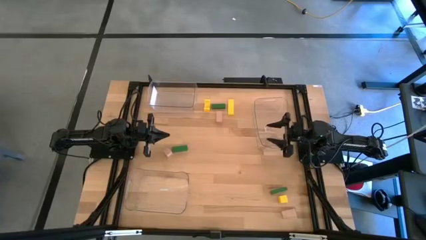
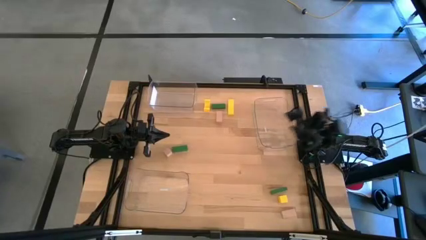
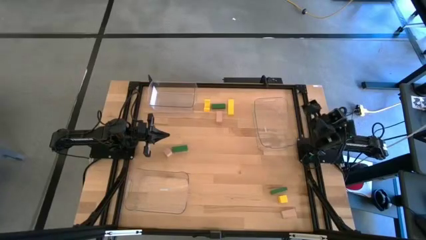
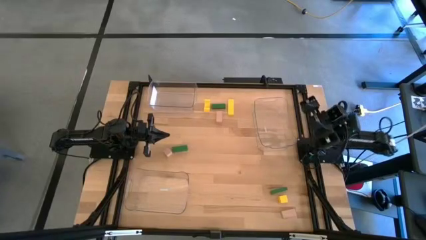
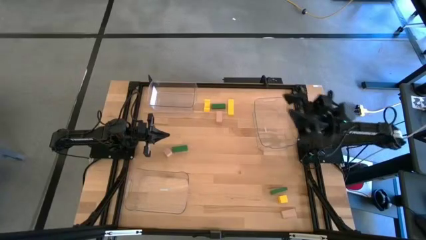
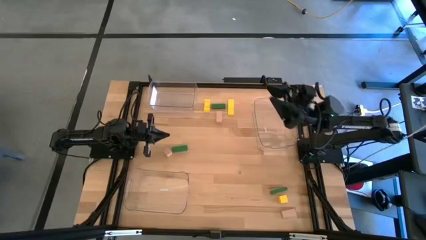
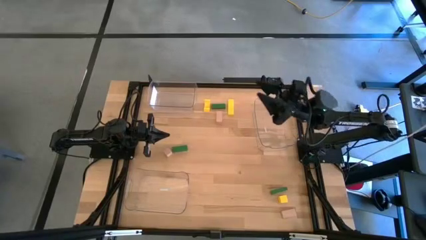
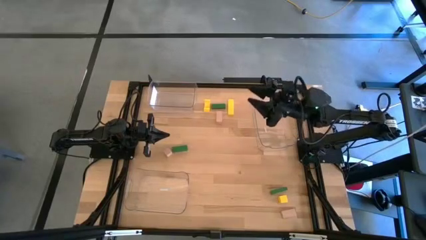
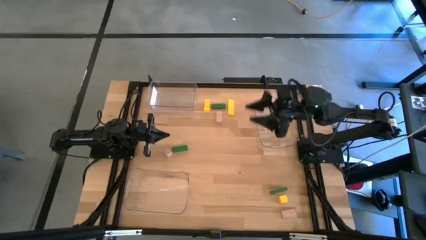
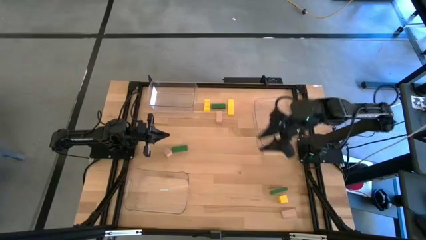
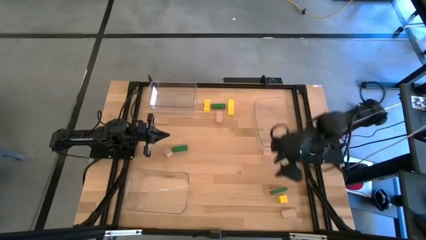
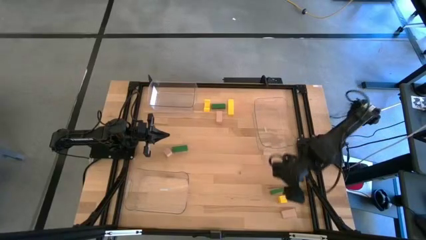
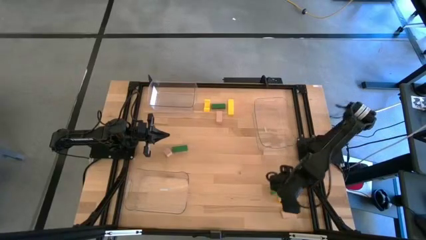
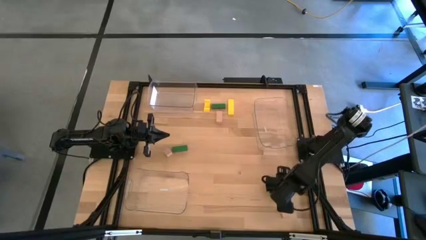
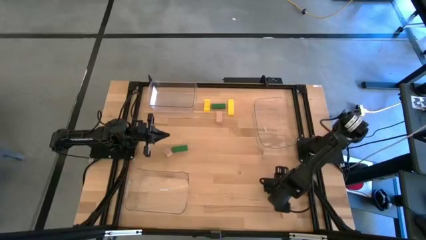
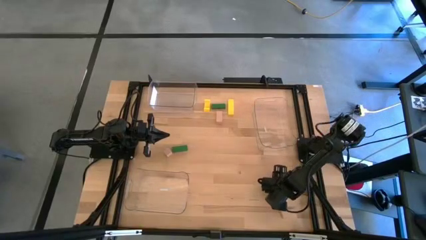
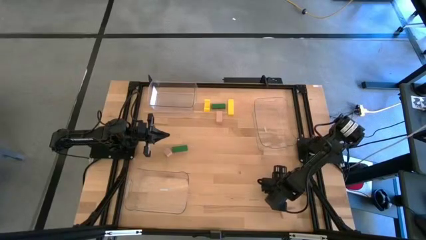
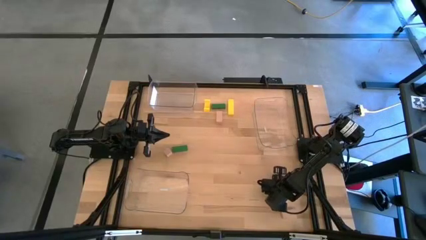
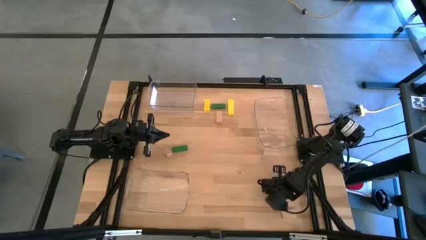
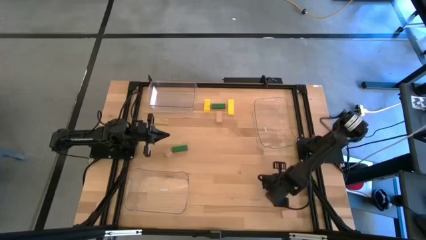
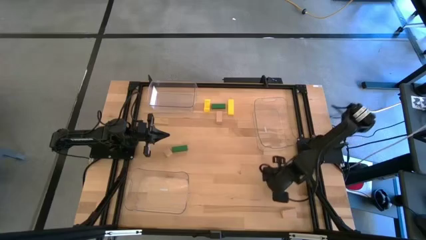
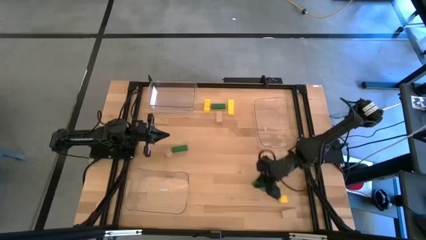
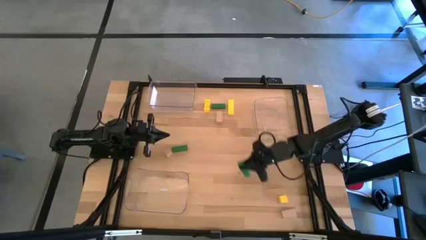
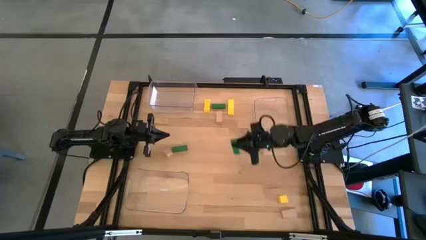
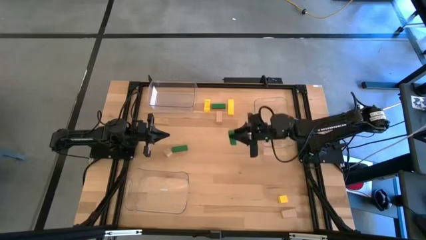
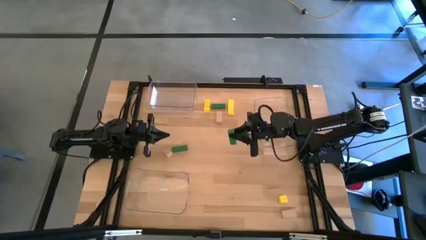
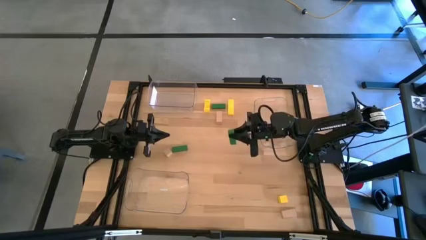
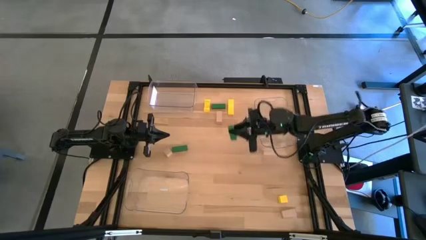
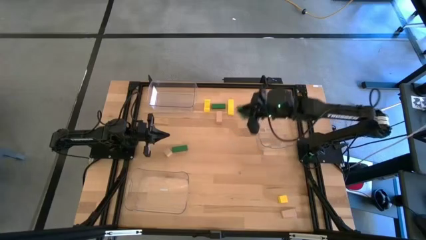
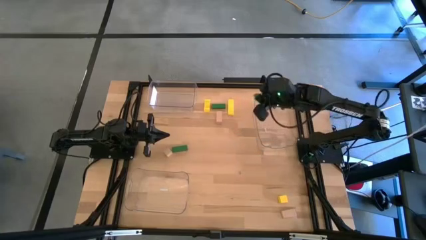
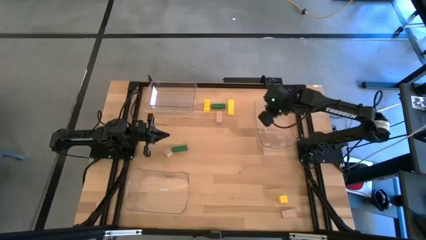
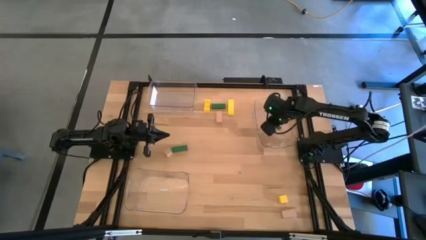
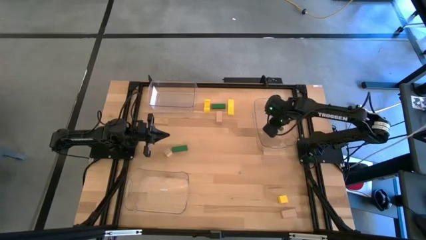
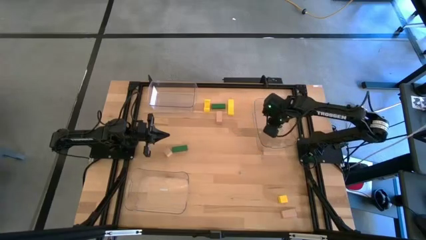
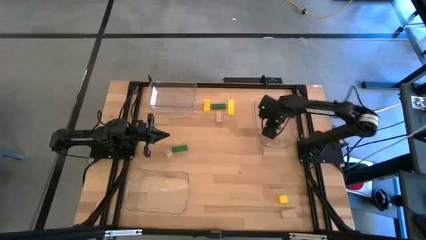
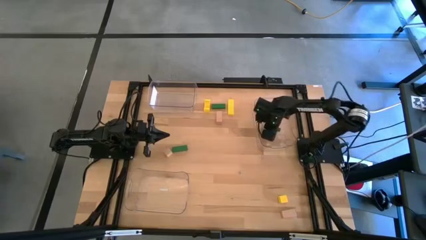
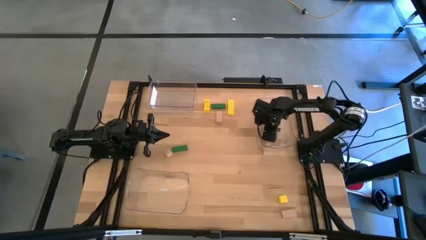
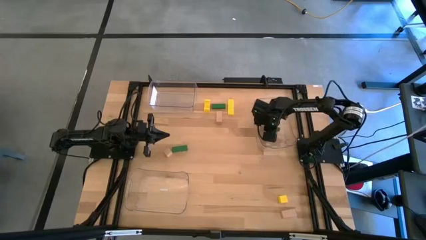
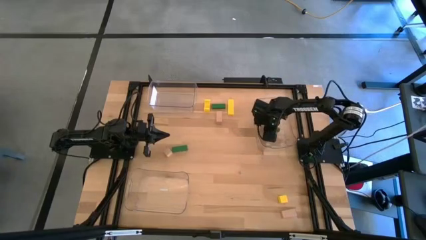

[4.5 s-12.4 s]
Task: Sort & place blocks by color
Put the bottom right green block into the top right transparent bin

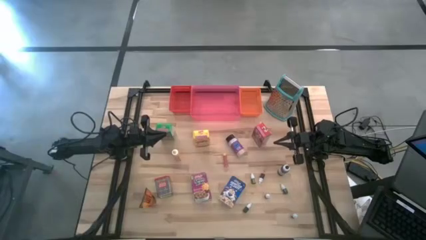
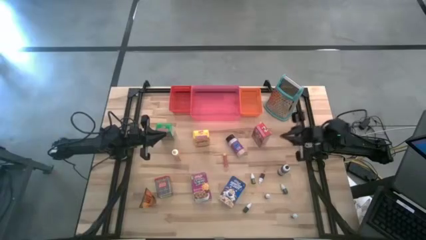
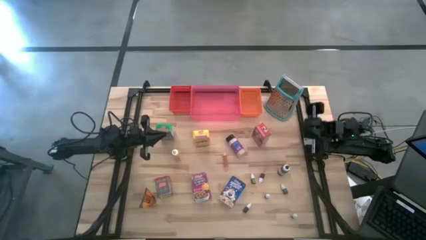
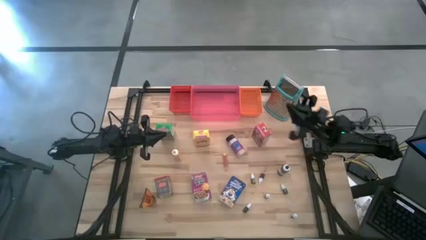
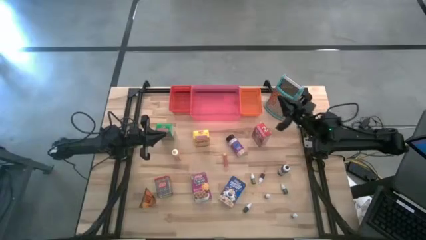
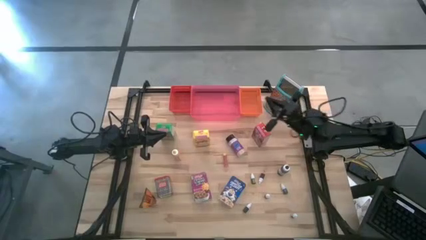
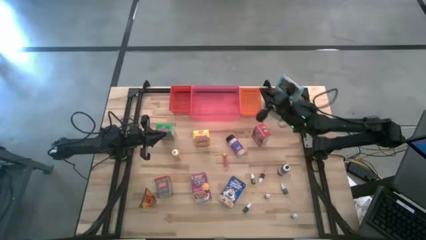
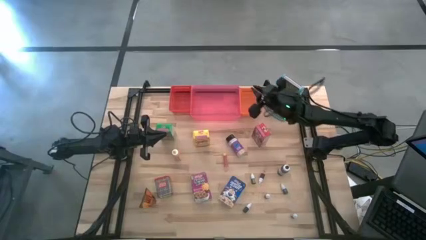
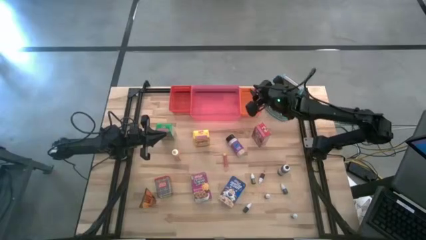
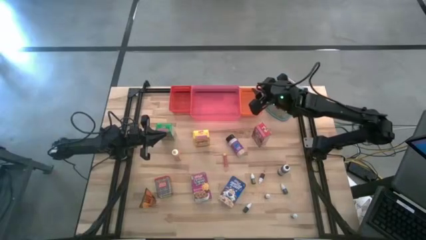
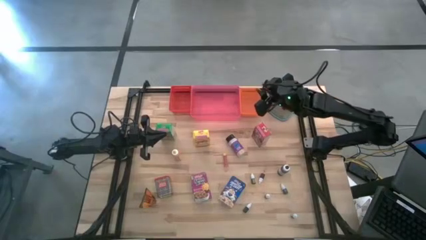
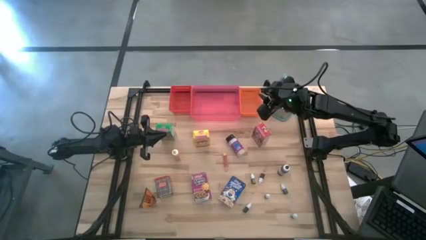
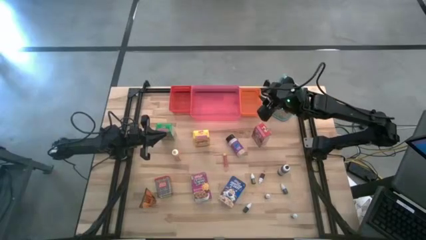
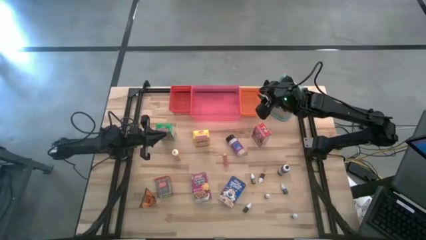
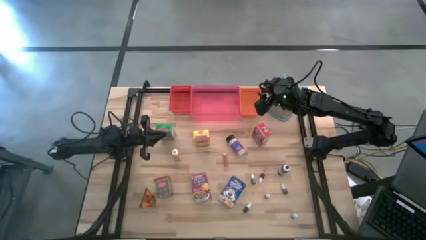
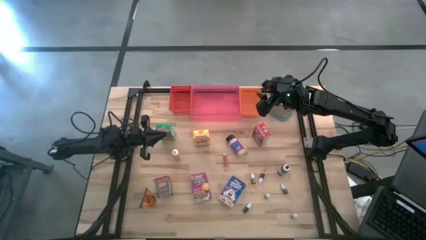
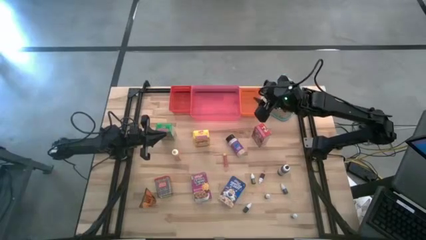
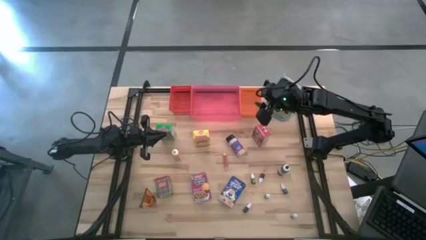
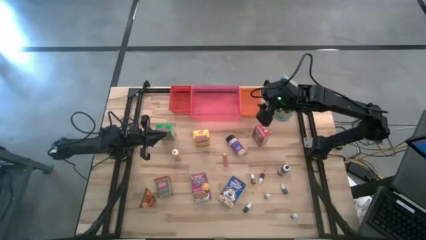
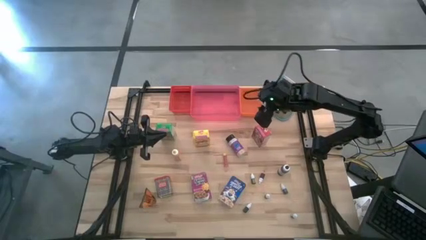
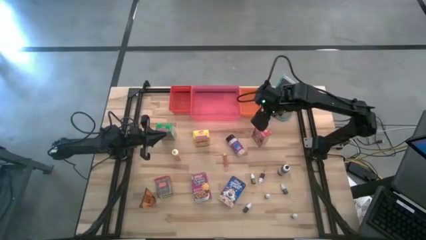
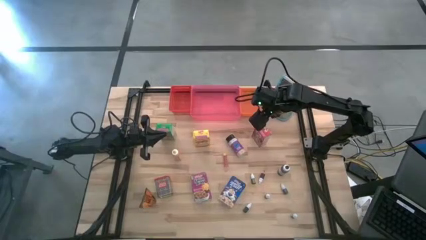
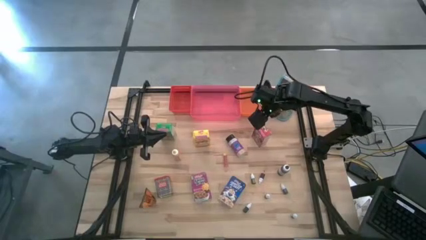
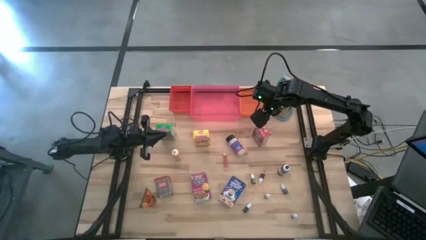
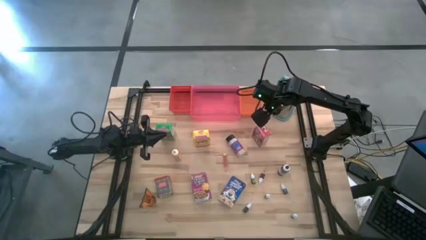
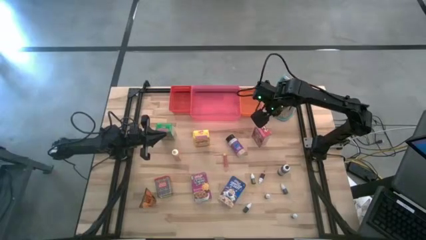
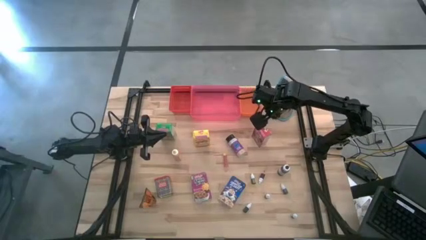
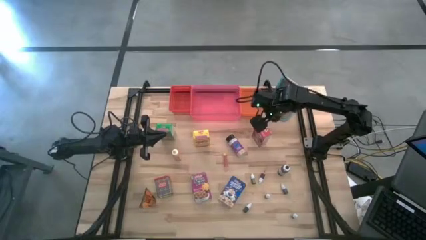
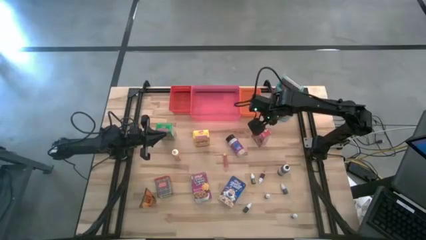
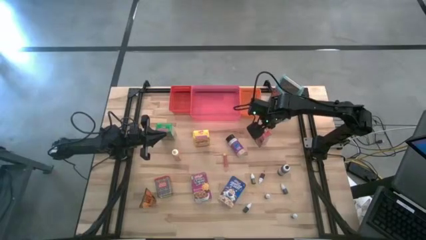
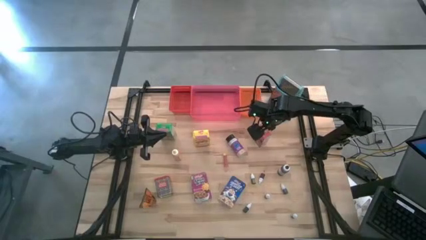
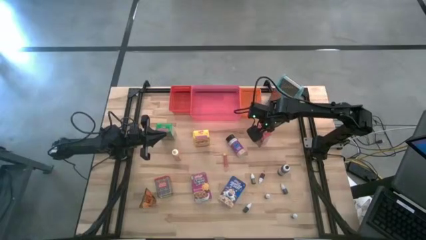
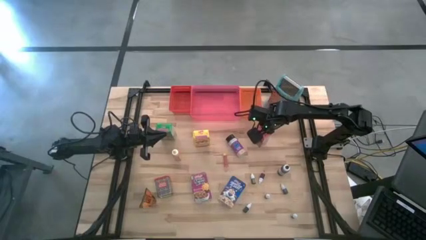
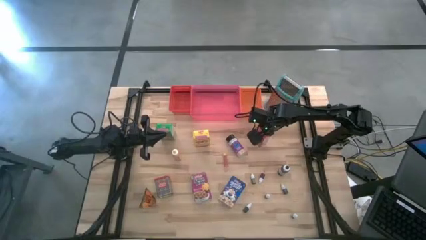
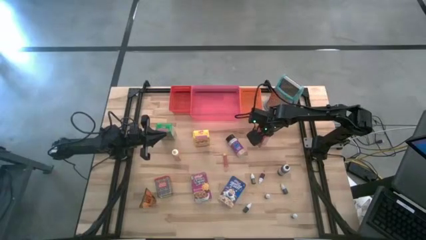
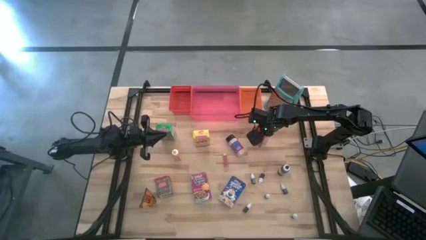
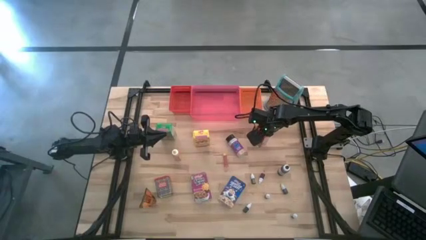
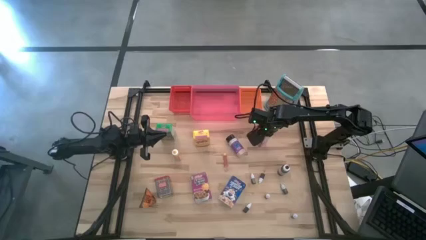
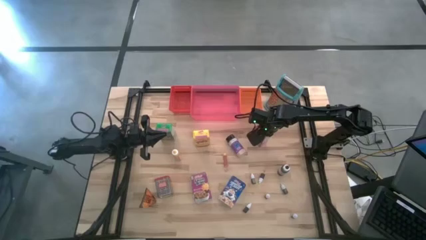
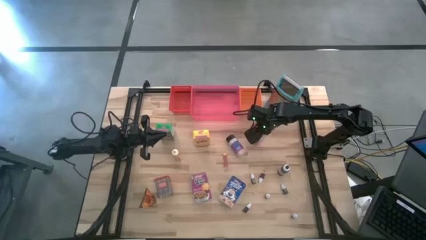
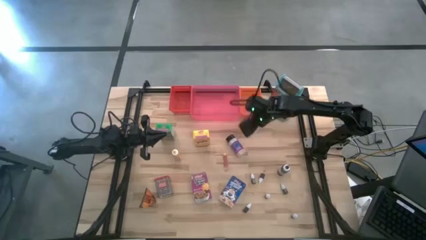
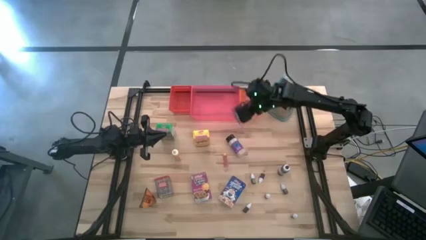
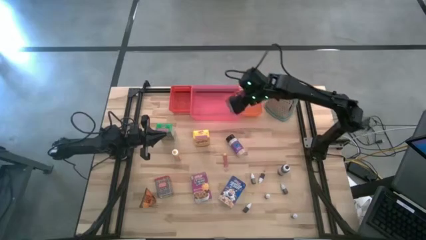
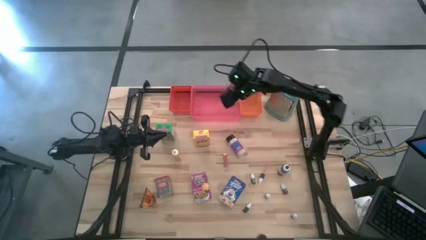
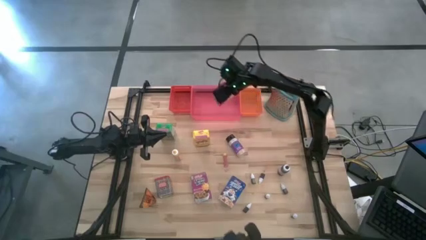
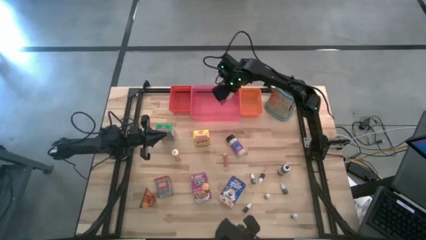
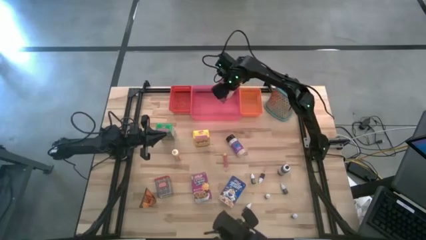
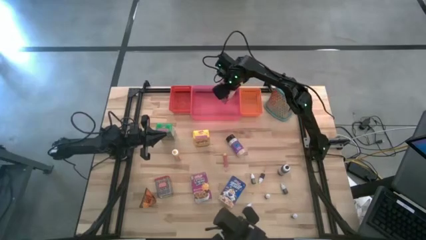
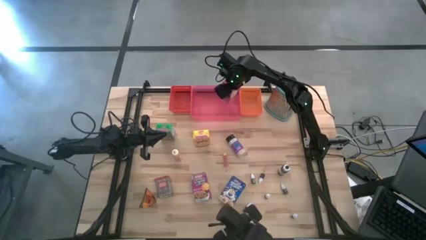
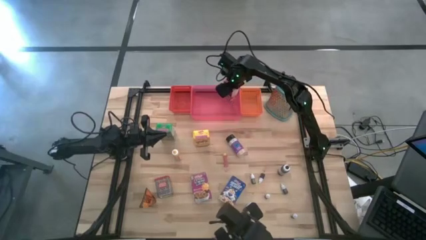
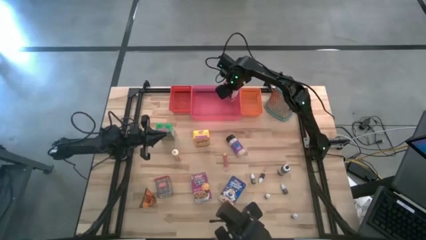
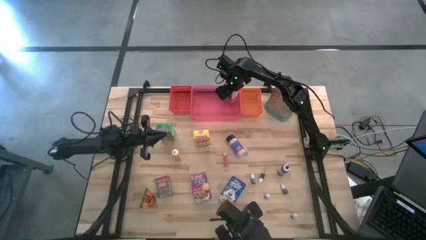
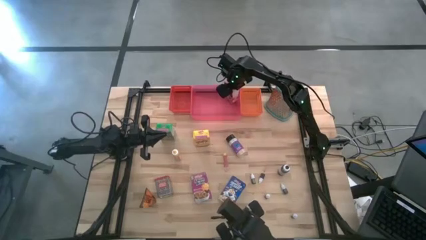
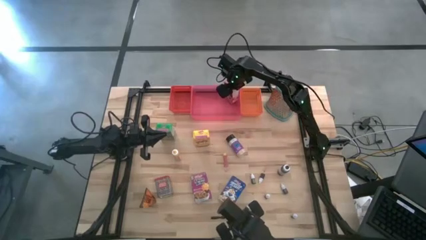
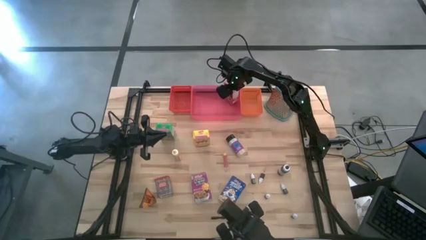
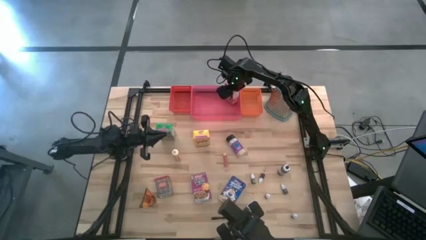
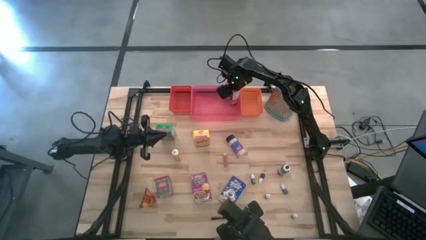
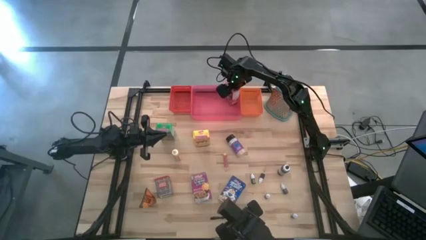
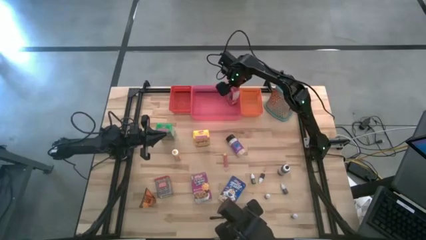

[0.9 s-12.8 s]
Task: Pick & Place Kitchen Items
Put the red cereal box into the pink bin
